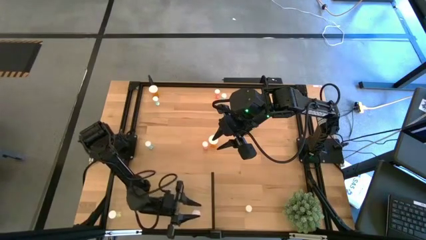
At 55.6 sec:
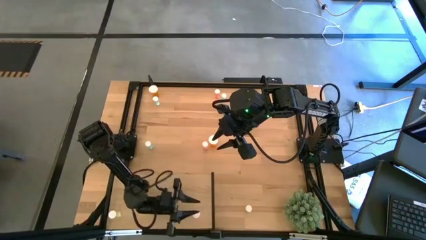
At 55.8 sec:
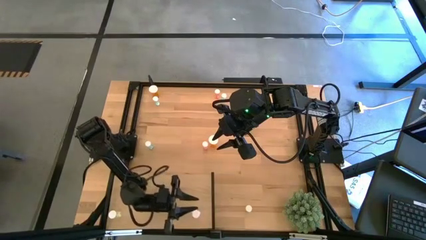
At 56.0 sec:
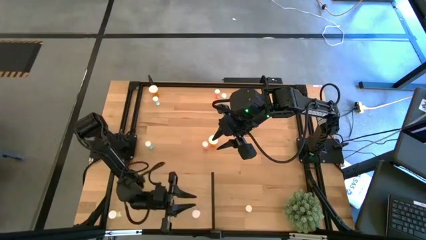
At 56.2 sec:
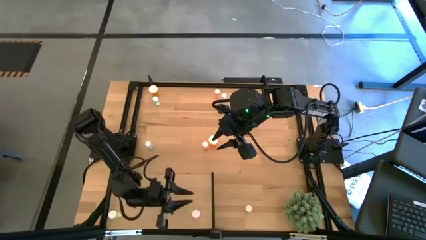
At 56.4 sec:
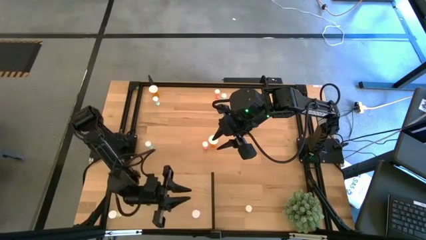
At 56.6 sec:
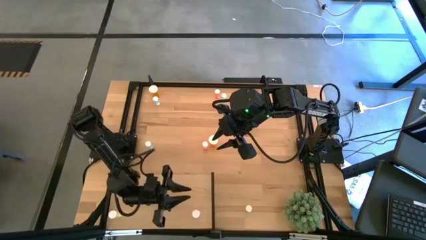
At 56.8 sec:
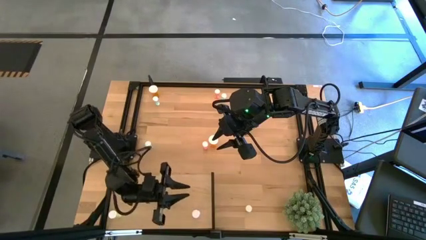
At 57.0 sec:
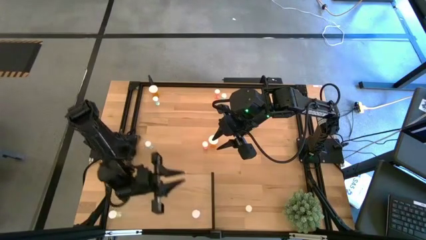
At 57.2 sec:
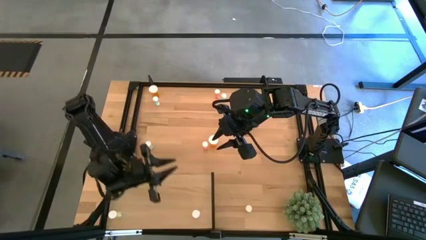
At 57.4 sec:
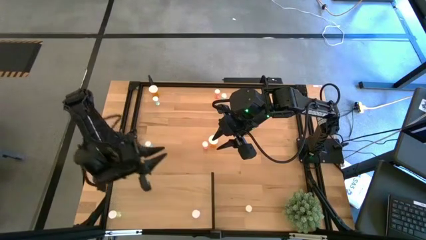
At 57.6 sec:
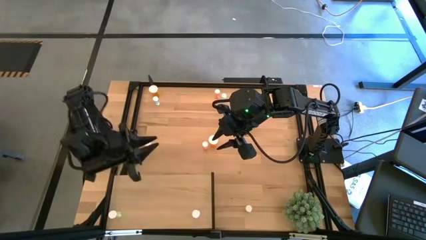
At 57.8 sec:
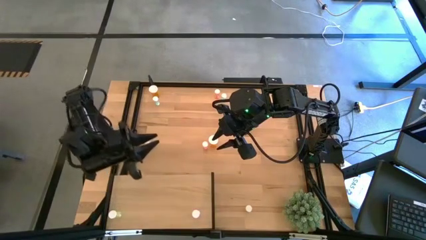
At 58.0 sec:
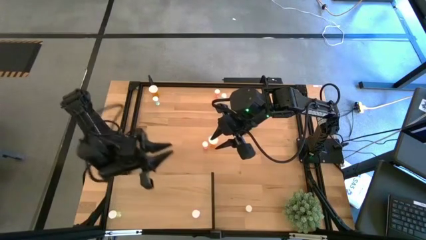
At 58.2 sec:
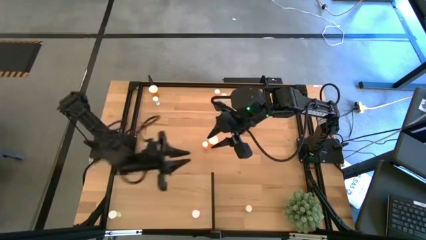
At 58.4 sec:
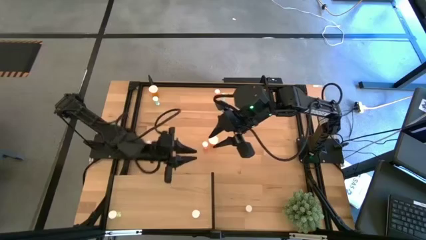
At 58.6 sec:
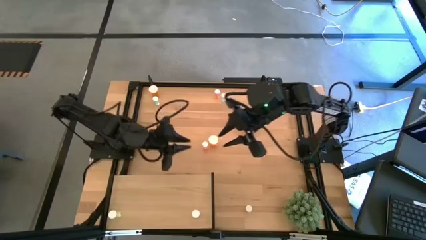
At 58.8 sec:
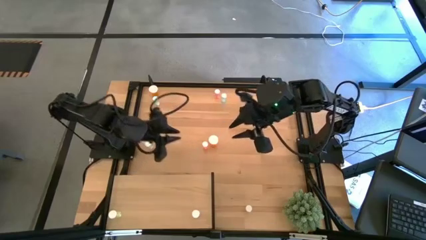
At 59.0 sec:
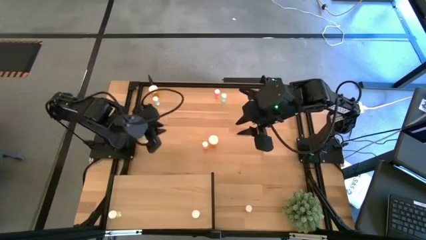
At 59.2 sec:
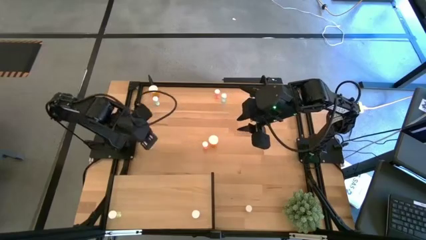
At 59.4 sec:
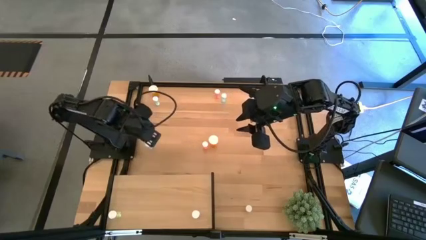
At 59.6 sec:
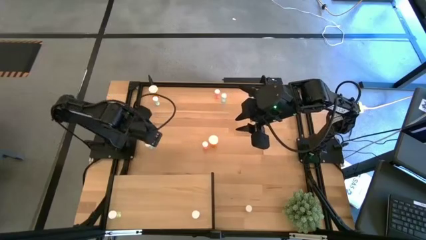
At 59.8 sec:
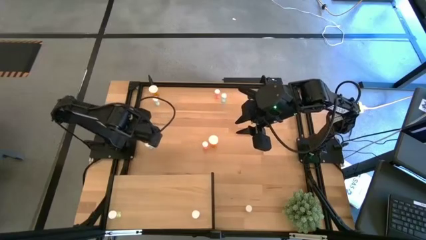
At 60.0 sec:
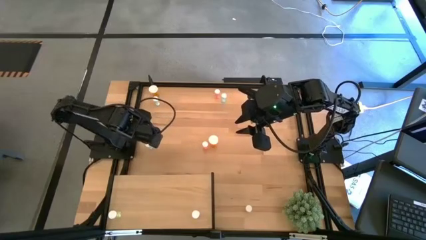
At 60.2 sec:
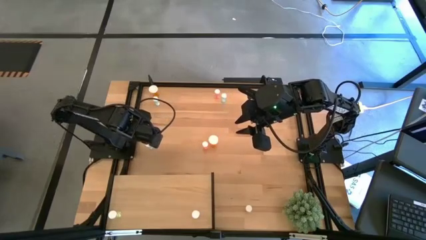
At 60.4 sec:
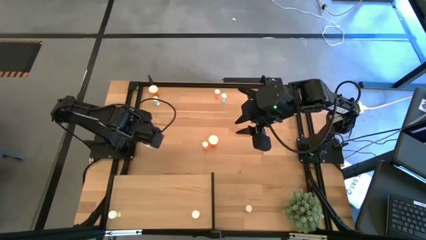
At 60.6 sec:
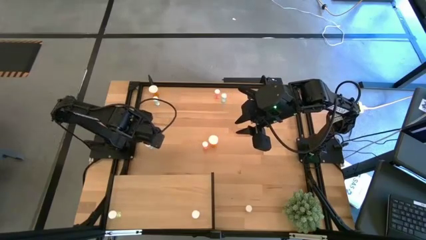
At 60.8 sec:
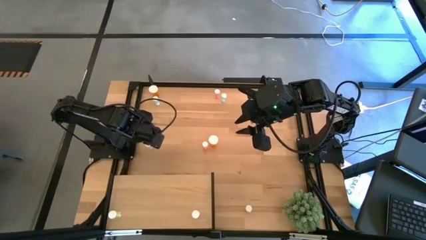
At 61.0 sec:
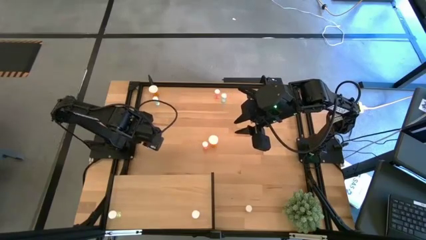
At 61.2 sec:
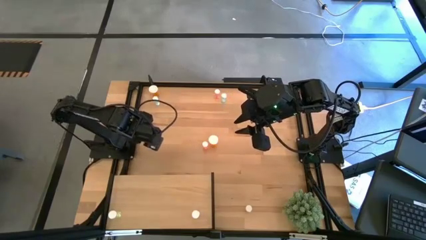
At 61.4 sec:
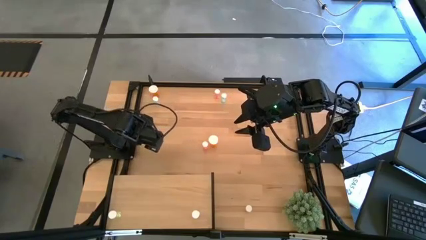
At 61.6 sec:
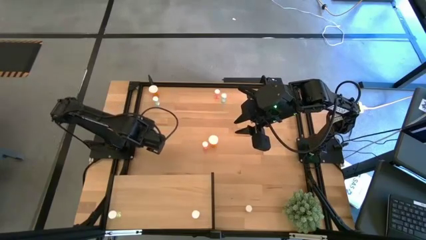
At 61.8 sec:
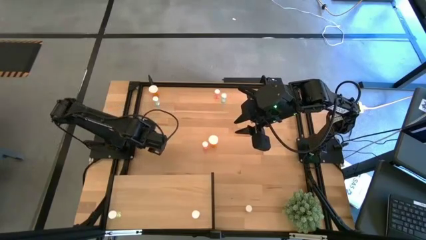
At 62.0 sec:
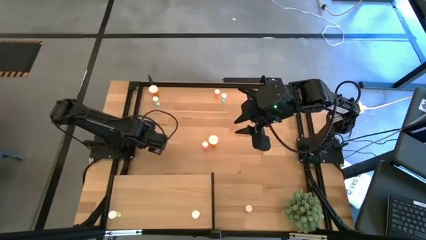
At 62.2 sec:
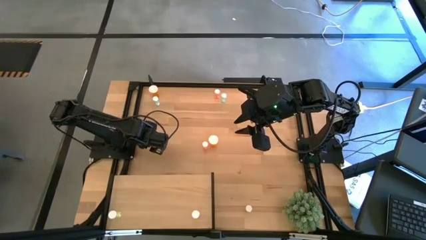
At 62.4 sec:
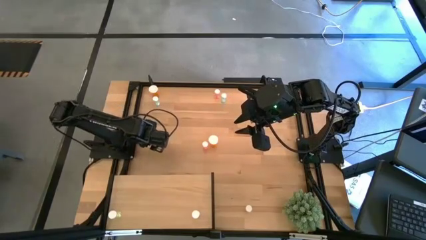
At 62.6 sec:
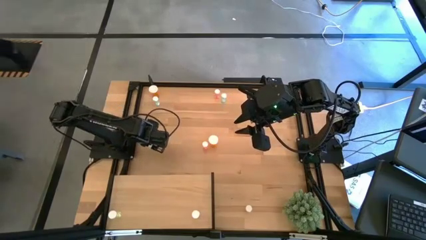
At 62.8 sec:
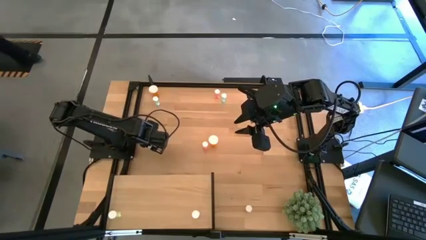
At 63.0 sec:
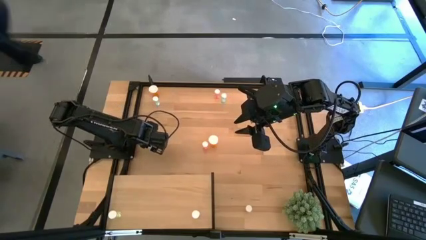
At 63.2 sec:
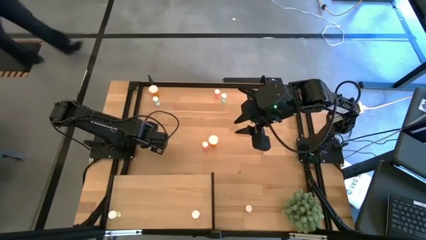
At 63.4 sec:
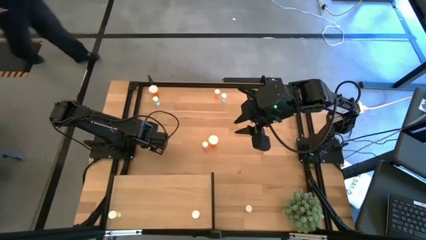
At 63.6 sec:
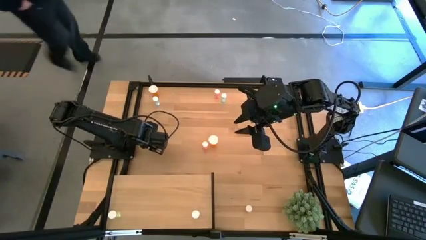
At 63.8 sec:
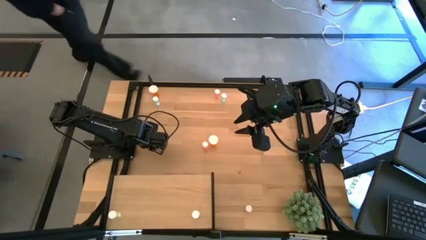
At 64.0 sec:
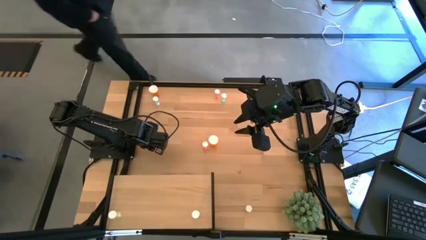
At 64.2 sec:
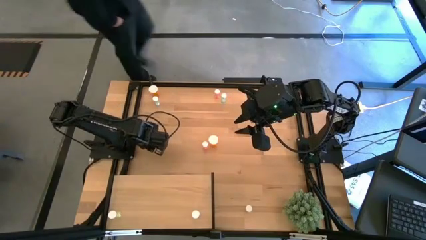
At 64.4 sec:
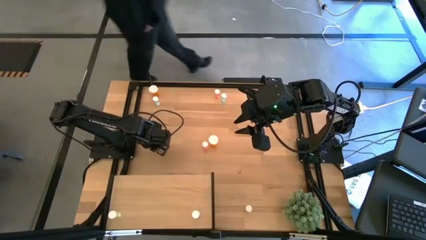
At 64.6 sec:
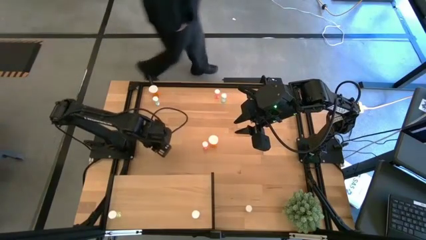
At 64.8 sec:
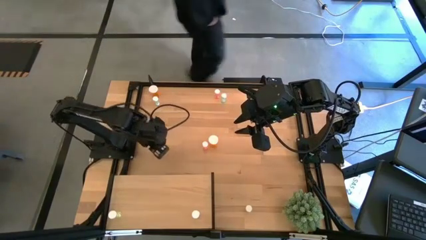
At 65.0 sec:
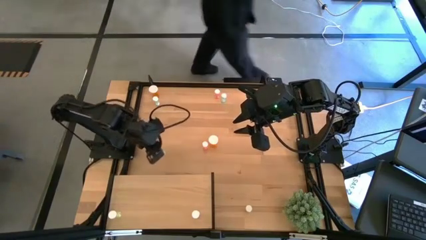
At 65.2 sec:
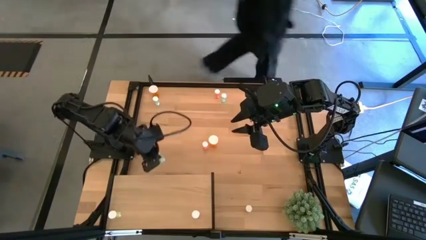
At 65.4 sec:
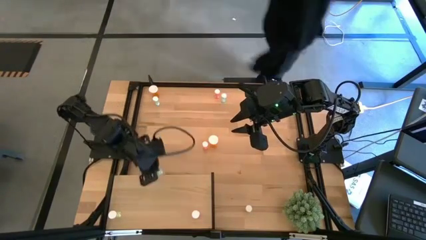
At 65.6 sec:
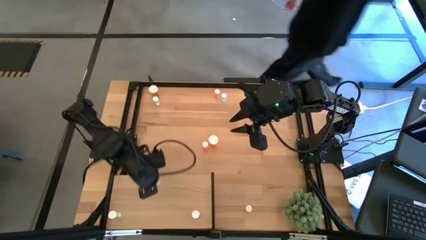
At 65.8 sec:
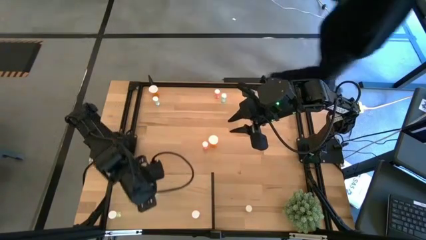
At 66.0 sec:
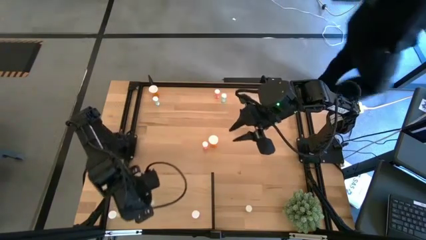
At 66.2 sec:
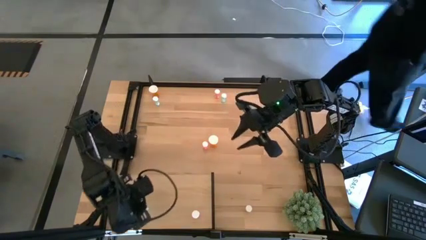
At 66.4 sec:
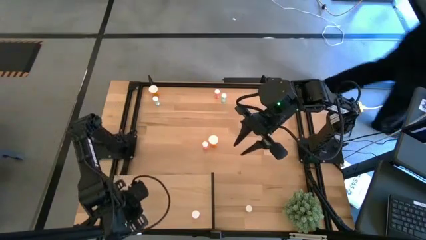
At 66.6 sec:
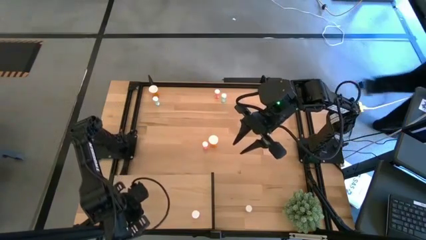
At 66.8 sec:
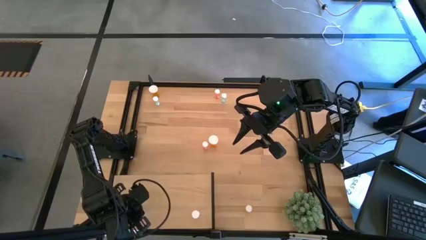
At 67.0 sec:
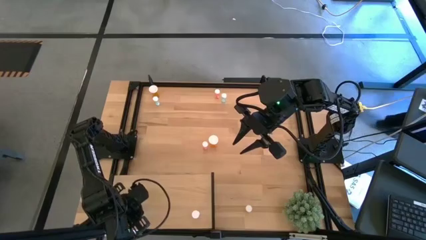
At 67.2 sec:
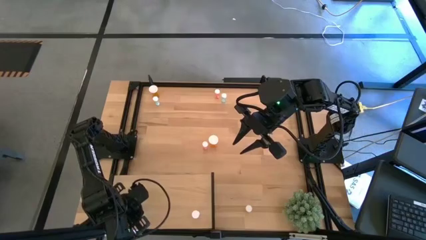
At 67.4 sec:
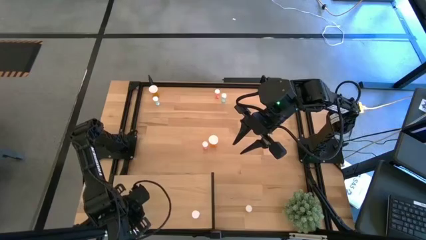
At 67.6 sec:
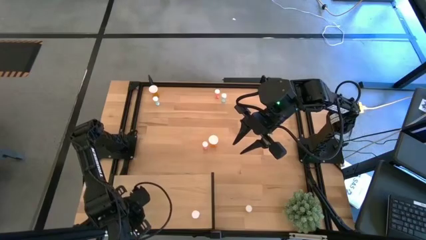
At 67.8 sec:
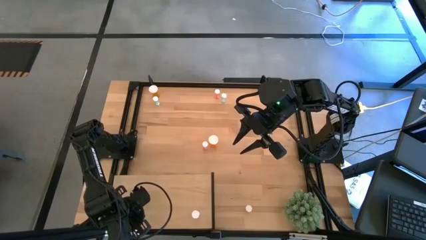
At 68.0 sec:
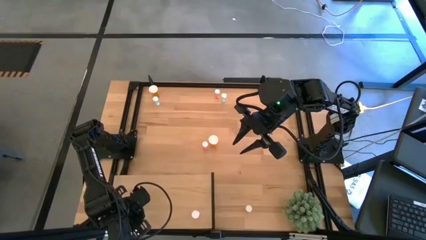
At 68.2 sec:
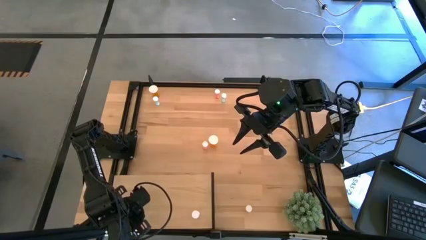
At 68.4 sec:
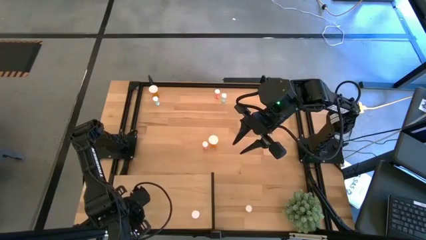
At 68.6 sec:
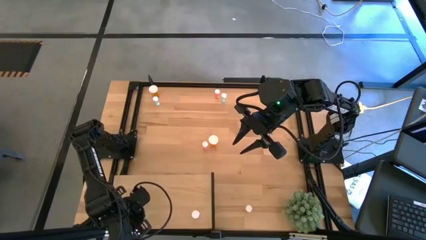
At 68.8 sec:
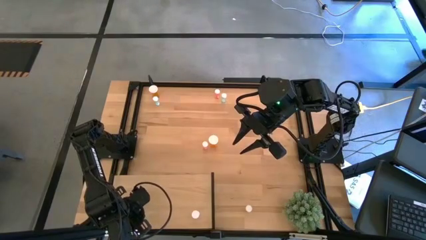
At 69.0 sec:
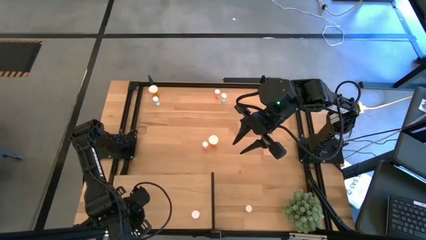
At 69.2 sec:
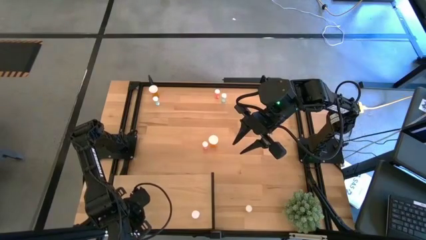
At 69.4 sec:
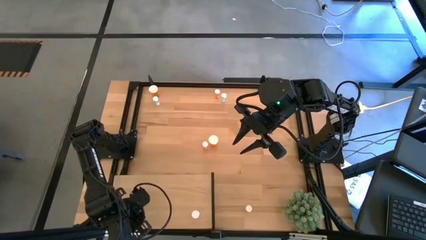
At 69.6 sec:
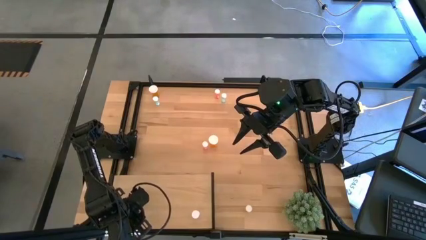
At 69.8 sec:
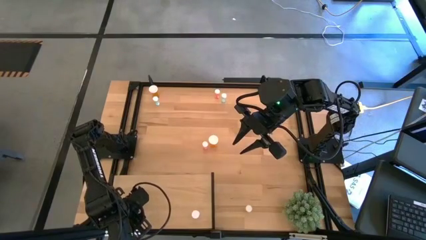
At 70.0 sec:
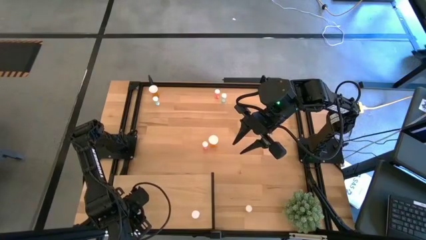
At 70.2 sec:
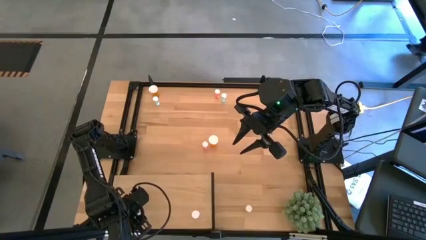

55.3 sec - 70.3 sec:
Task: Pick and place medicine bottles onto shelf by color
Put the left blue pill bottle on the shelf

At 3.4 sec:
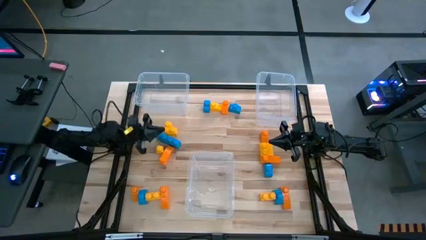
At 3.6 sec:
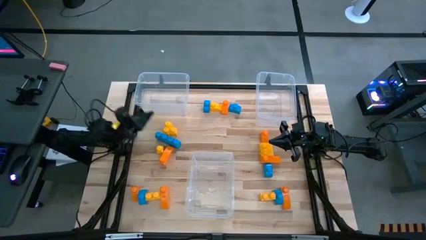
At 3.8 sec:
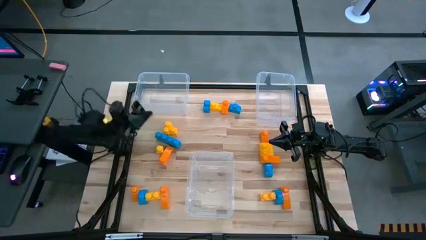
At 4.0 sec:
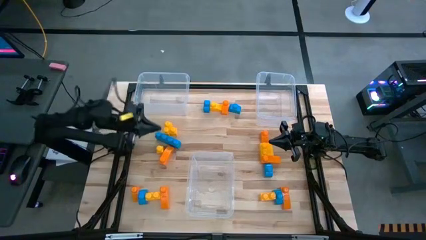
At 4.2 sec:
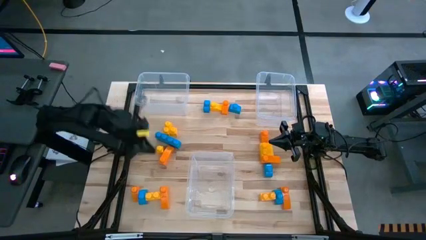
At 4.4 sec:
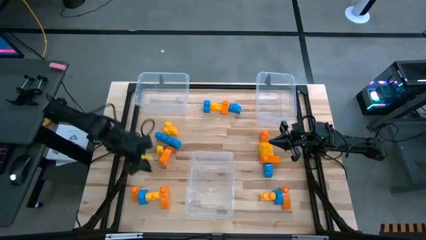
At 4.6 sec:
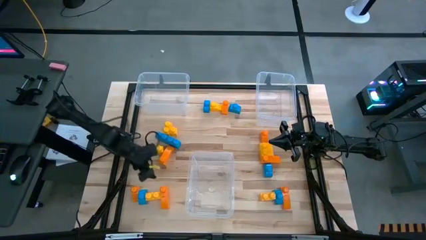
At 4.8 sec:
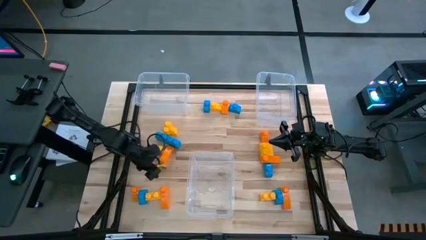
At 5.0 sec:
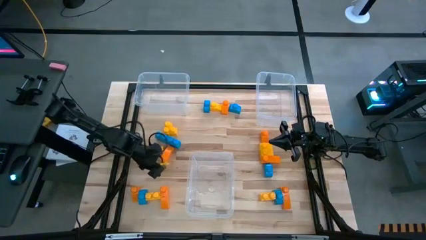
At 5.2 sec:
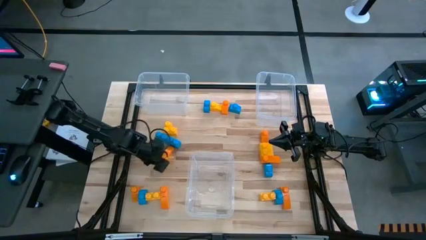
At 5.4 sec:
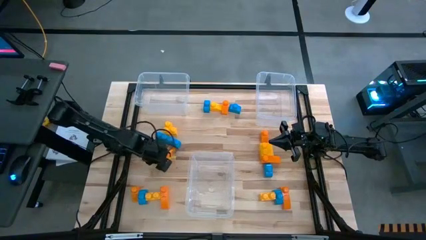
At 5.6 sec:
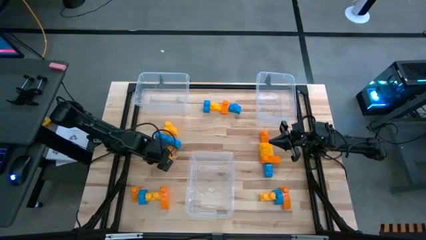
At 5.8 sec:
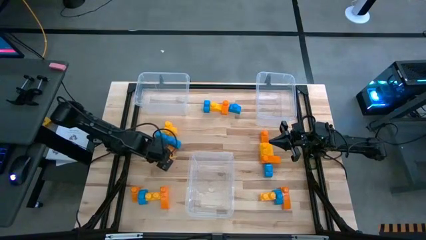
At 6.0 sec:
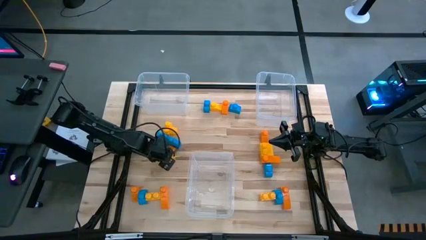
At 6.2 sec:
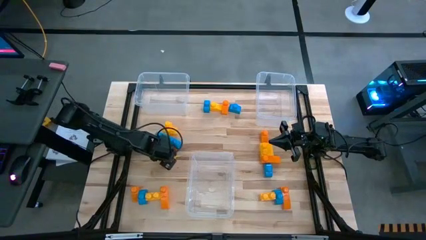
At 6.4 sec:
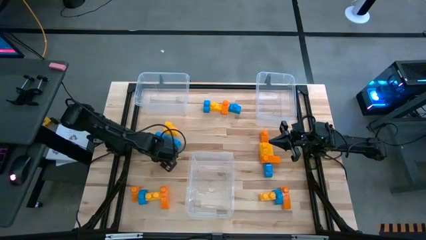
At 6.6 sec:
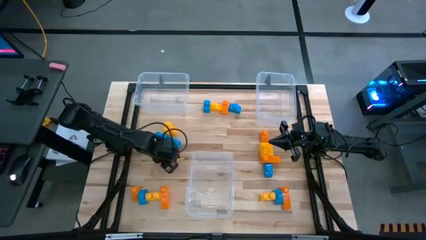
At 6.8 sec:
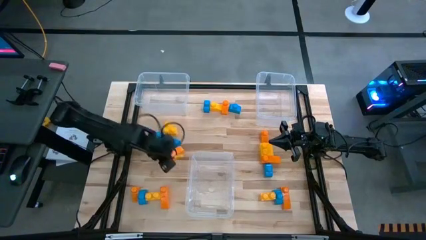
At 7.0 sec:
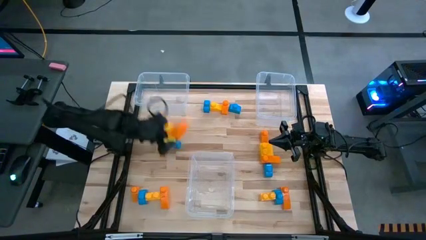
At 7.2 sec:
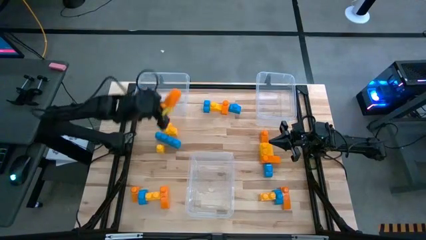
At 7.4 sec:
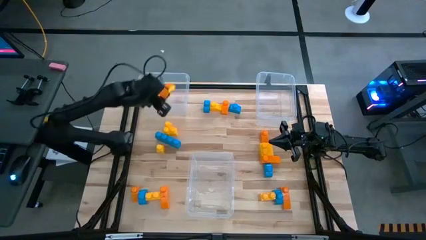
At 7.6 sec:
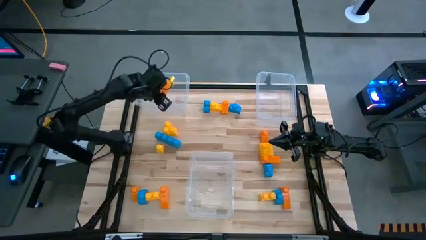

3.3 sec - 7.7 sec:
Task: Sort blocks
Put the orange game piece into the top left transparent bin
